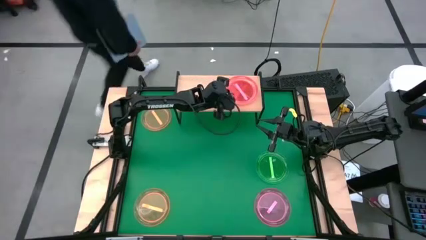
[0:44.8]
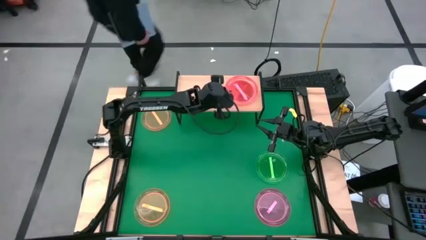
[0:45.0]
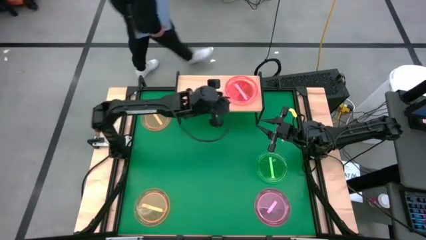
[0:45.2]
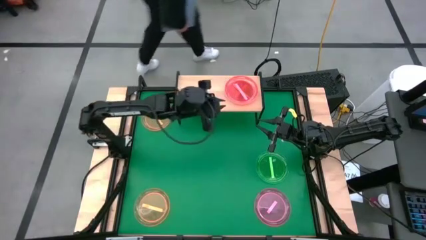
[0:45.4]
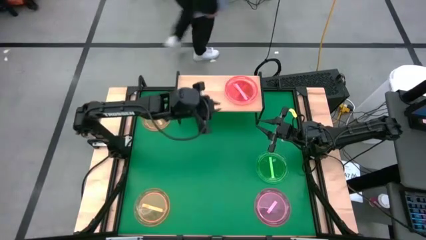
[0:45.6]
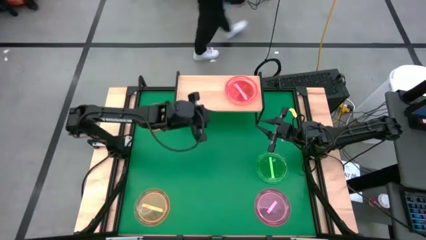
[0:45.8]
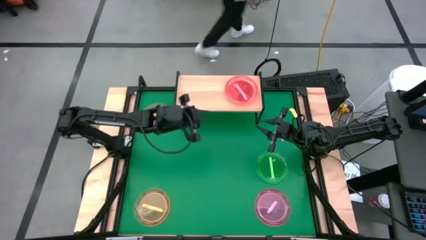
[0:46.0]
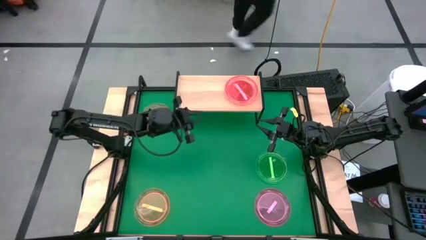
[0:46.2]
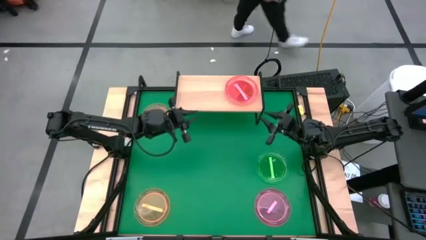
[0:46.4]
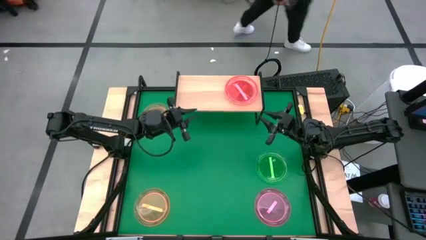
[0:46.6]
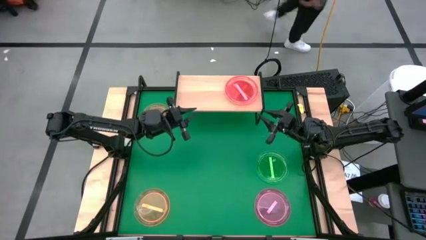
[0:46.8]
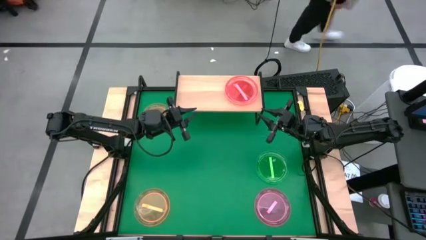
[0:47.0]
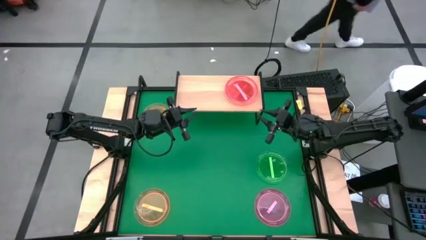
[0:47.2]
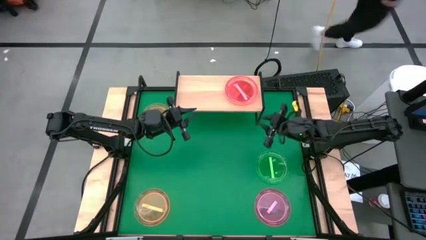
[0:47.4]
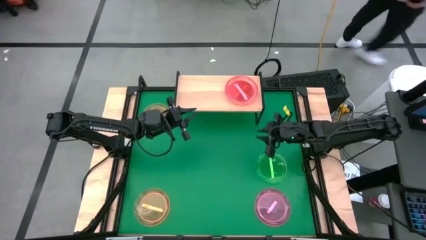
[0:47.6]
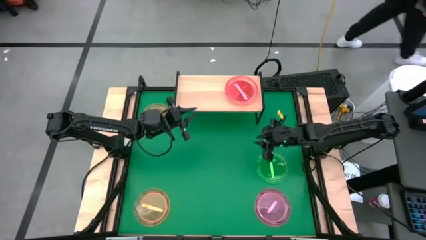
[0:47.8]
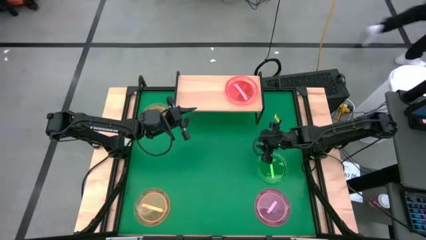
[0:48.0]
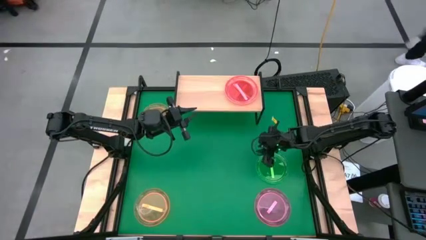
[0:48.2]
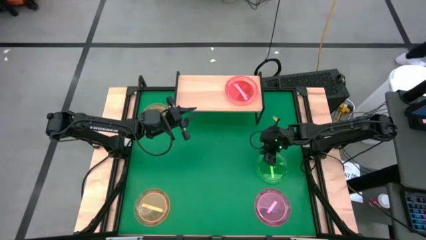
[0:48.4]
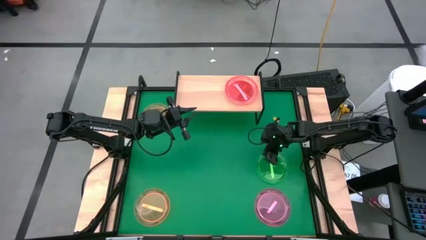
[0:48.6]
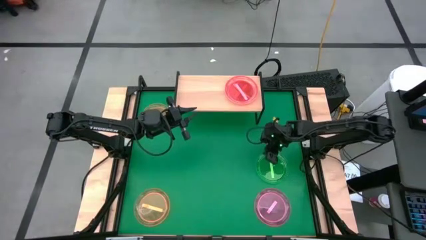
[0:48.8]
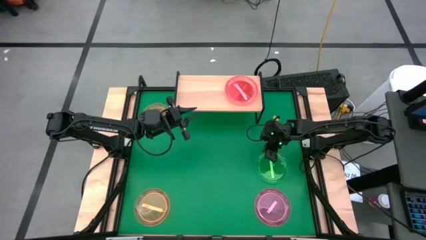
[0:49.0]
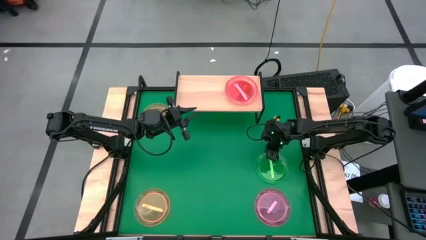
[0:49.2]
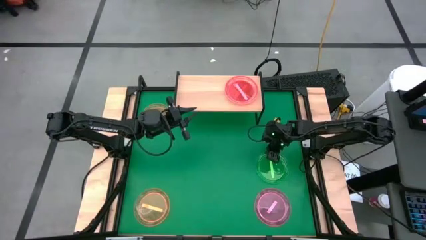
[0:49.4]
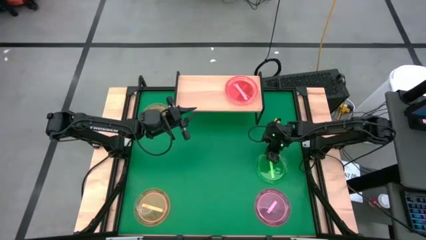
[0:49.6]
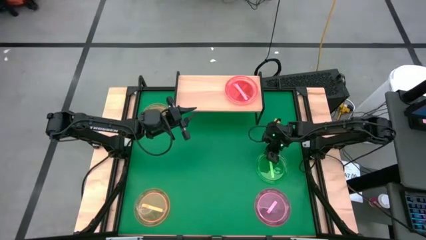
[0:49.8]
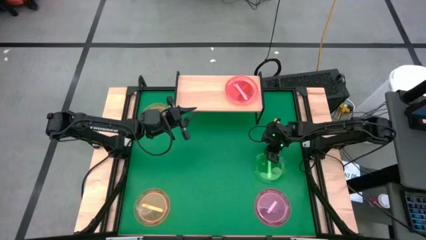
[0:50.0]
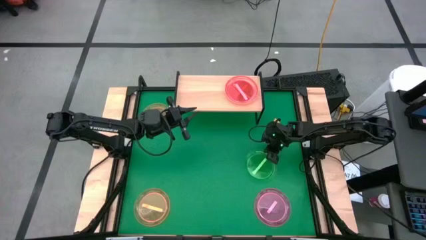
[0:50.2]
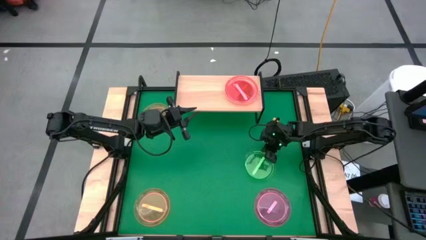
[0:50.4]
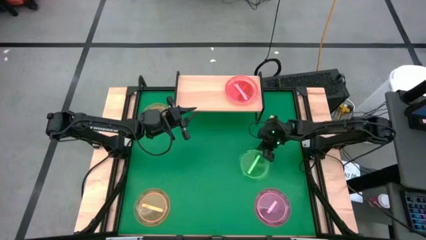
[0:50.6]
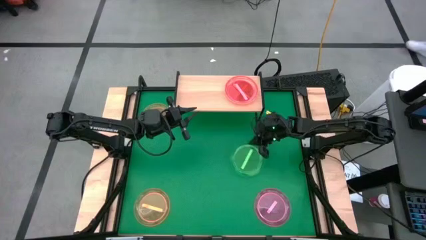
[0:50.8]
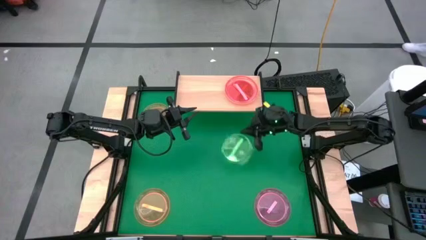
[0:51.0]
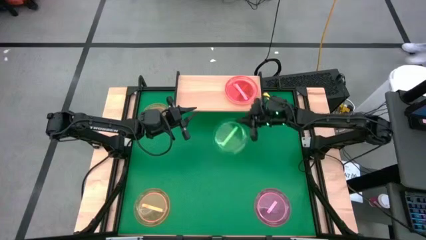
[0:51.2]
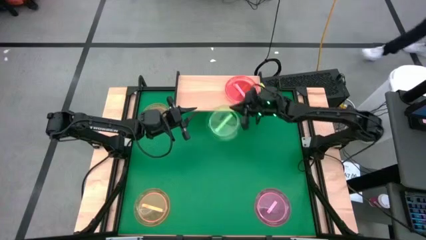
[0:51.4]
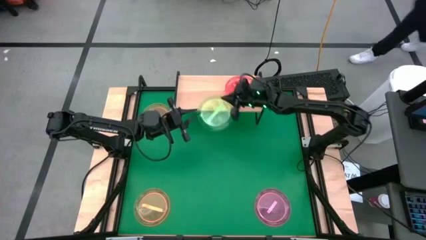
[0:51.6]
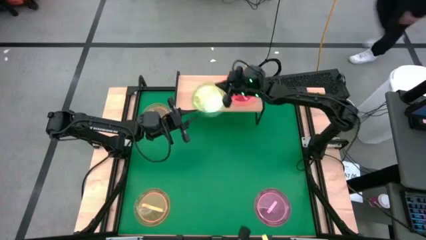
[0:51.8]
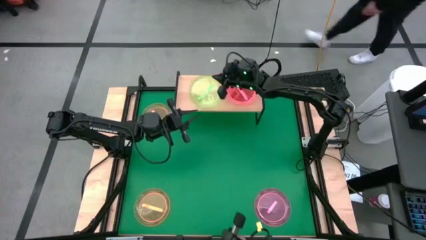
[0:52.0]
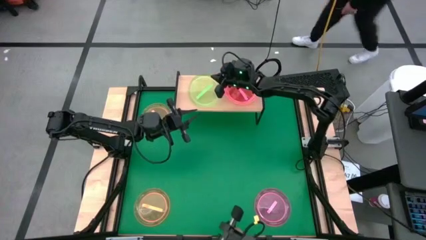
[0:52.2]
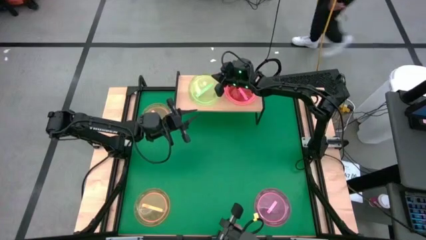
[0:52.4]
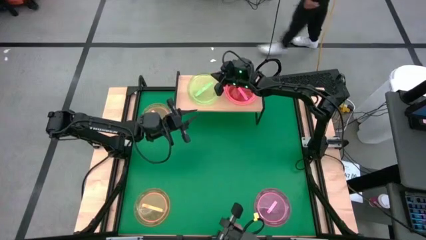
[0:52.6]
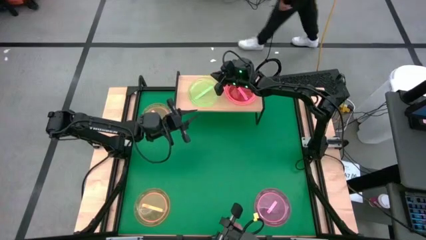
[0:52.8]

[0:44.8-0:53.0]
Task: Place and stack plates onto a shelf
Put the green plate on the shelf

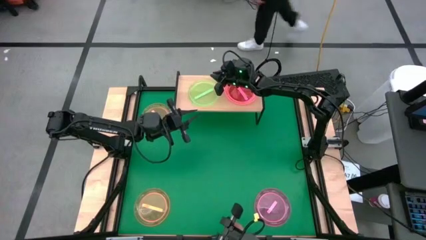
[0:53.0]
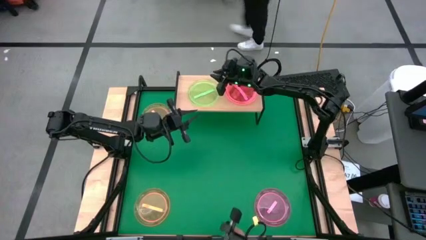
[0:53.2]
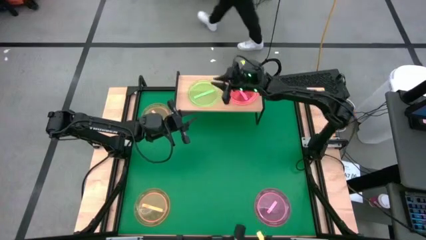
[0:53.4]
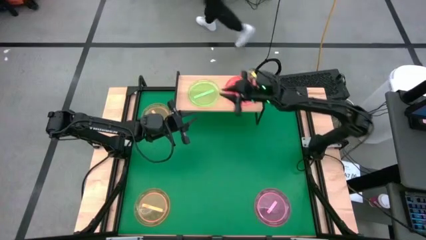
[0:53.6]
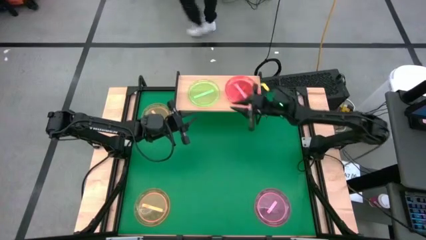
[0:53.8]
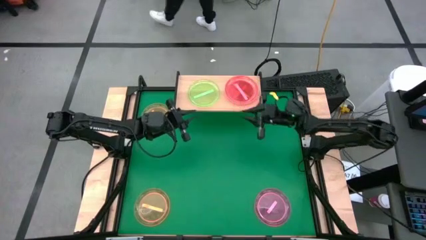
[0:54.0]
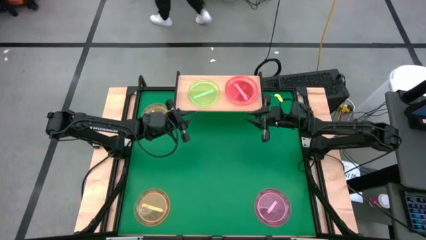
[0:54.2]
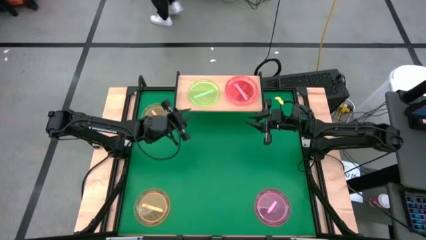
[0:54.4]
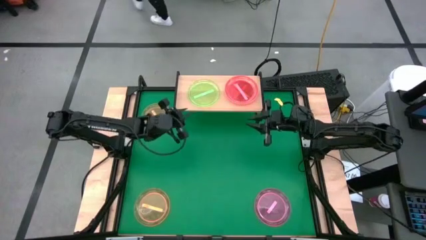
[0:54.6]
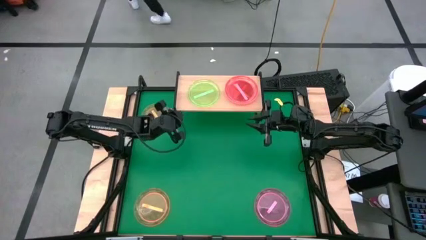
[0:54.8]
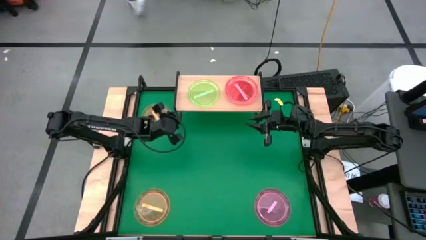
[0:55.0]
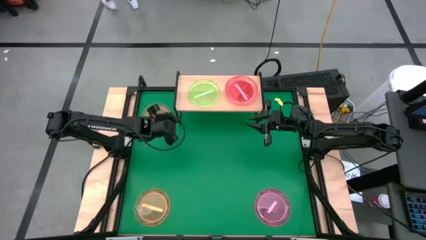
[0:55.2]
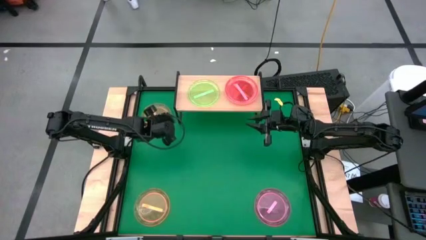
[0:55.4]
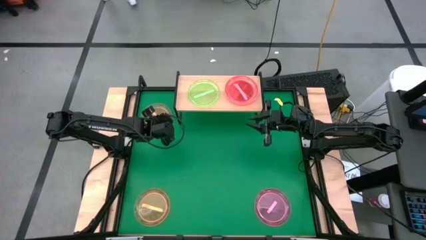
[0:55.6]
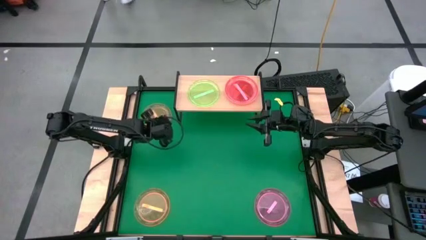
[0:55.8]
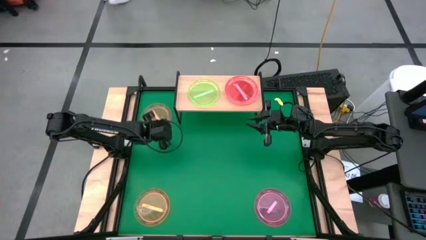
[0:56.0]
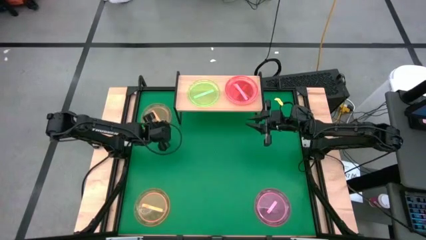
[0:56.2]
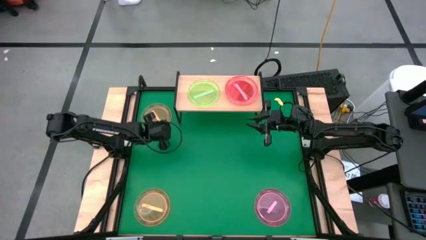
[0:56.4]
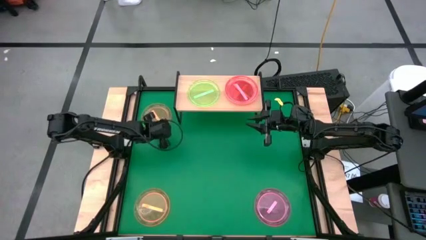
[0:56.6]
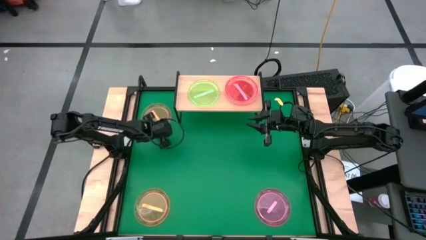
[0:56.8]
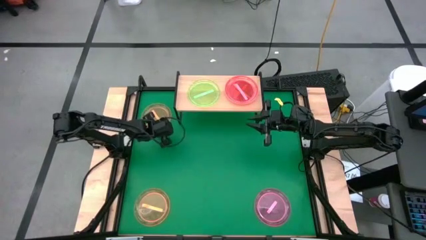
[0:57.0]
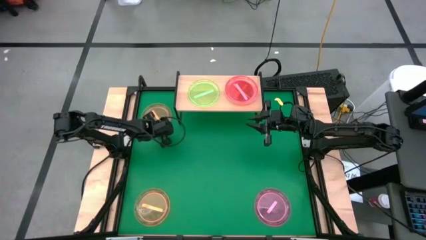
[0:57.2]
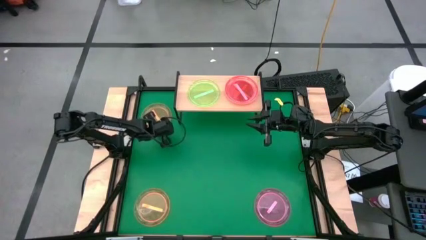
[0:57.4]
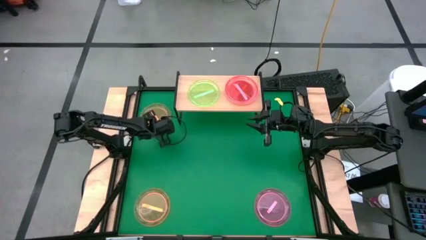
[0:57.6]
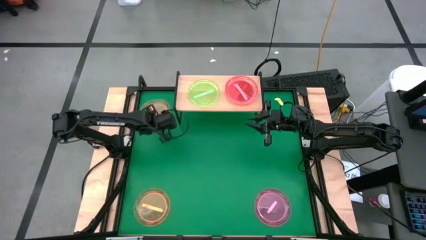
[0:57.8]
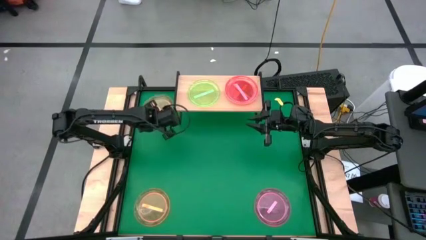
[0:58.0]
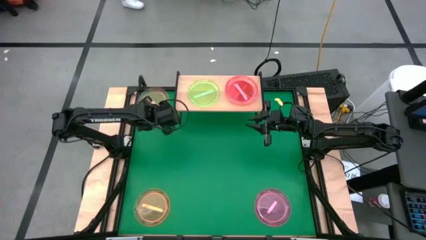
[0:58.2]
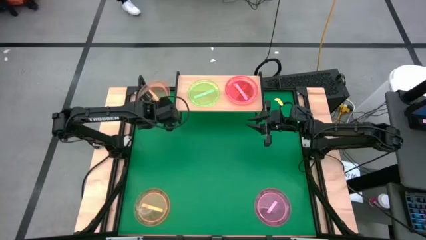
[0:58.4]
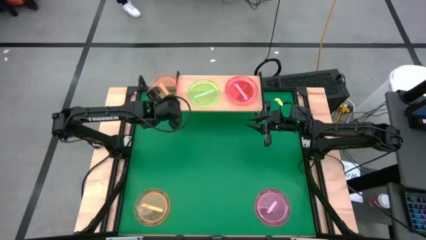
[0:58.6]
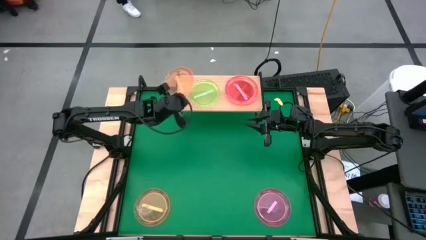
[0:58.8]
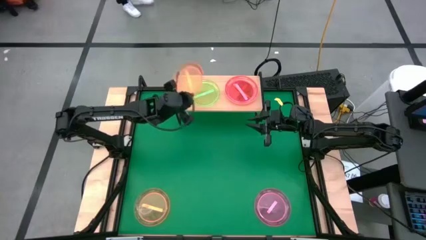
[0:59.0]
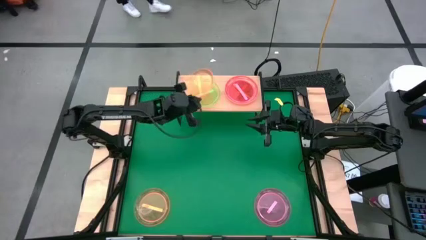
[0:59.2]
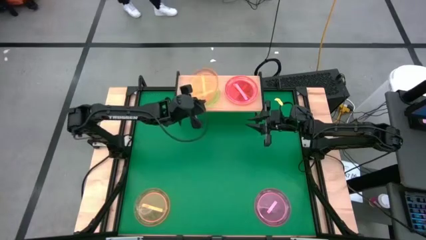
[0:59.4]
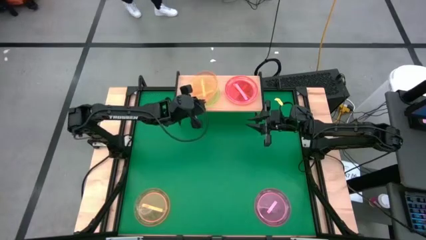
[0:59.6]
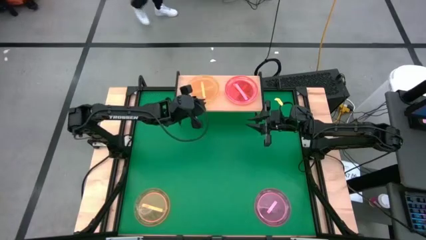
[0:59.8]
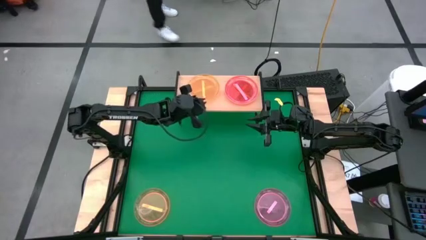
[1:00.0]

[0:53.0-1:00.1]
Stack the orange plate on top of the green plate on the shelf
